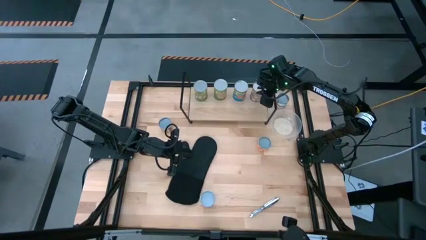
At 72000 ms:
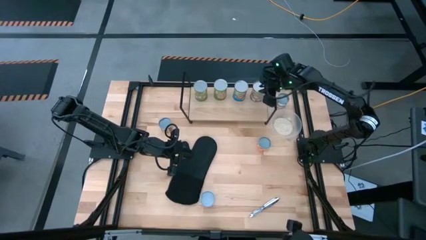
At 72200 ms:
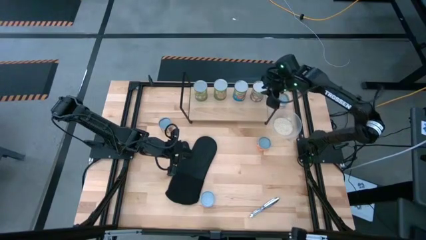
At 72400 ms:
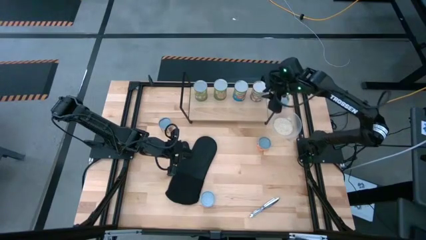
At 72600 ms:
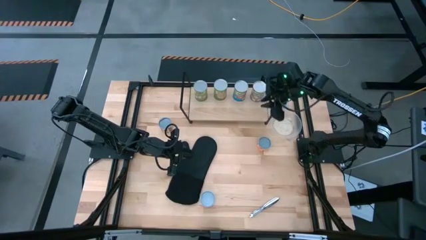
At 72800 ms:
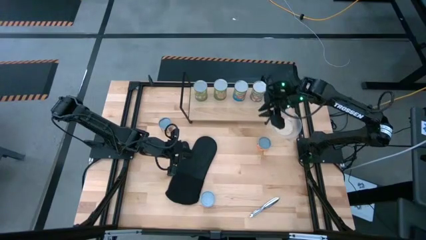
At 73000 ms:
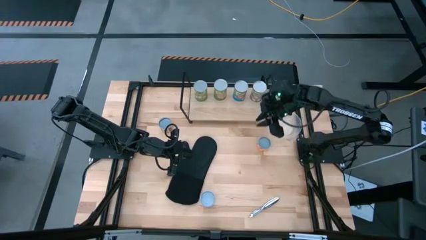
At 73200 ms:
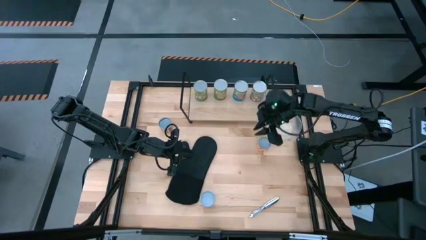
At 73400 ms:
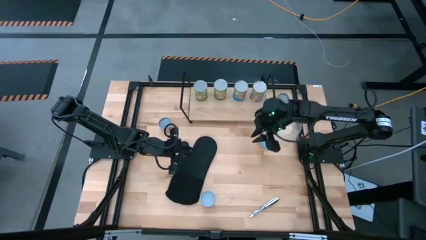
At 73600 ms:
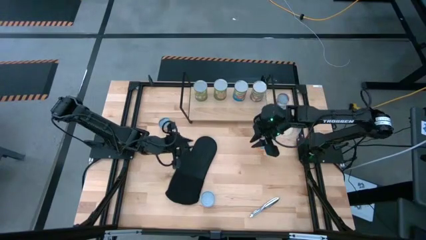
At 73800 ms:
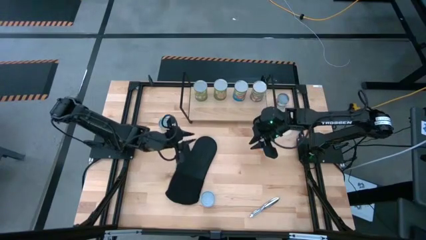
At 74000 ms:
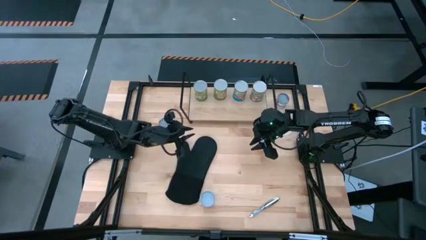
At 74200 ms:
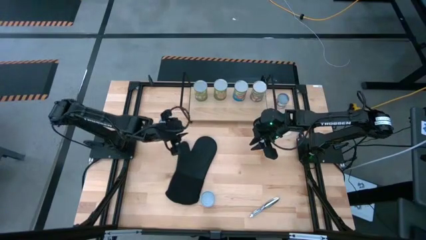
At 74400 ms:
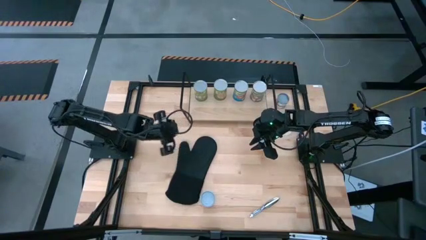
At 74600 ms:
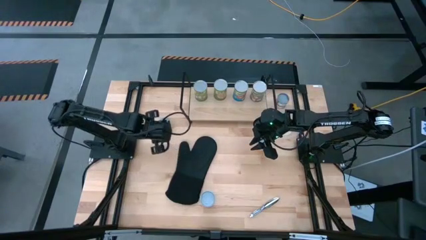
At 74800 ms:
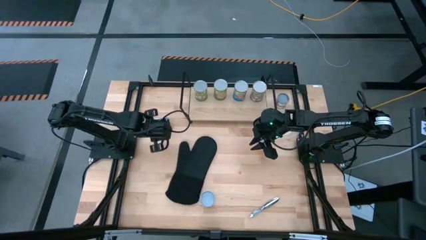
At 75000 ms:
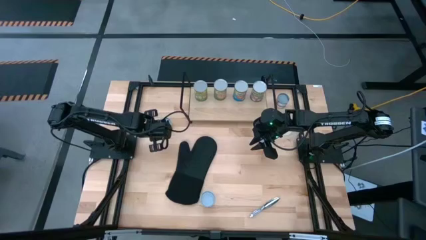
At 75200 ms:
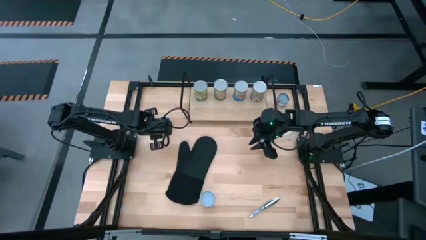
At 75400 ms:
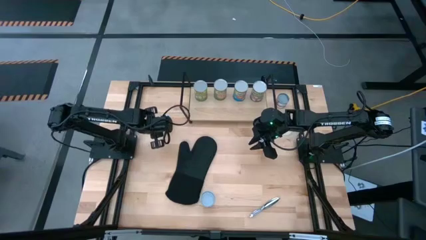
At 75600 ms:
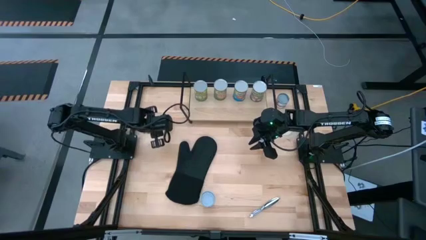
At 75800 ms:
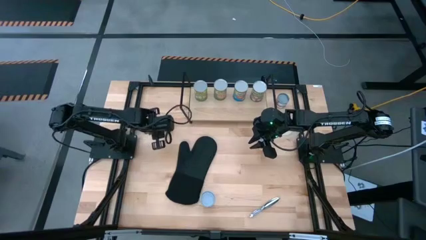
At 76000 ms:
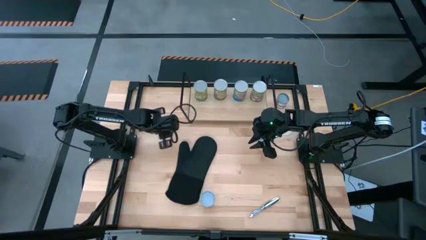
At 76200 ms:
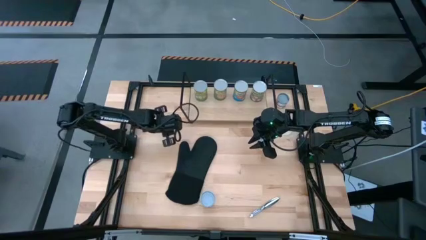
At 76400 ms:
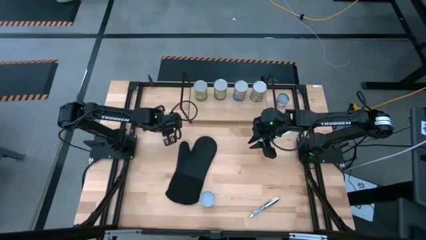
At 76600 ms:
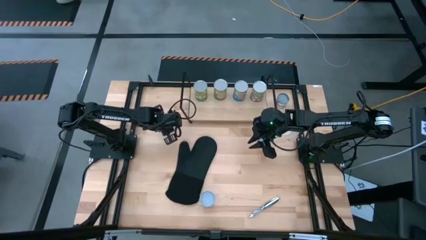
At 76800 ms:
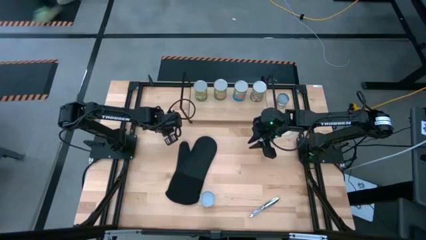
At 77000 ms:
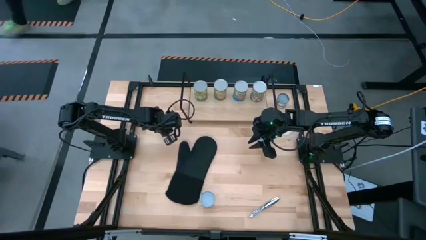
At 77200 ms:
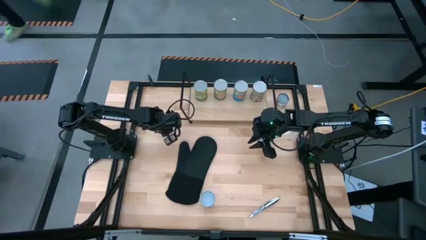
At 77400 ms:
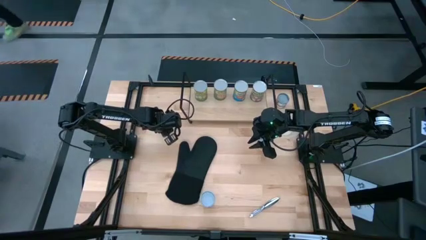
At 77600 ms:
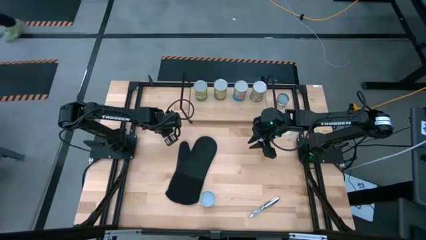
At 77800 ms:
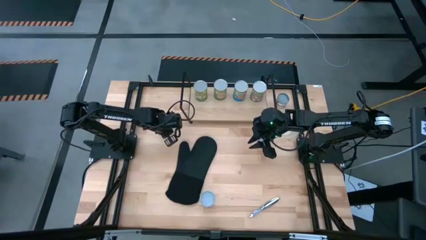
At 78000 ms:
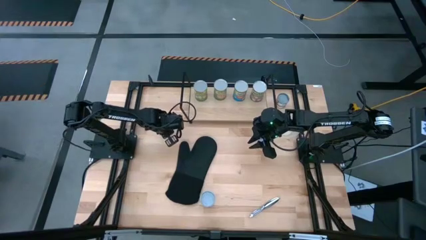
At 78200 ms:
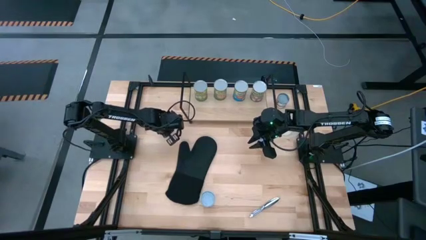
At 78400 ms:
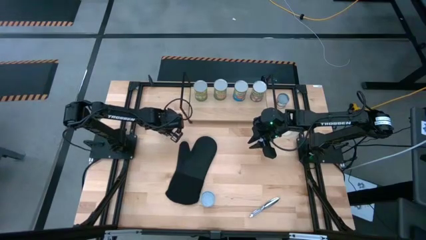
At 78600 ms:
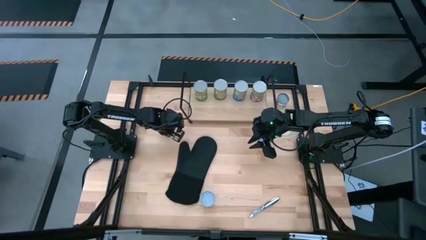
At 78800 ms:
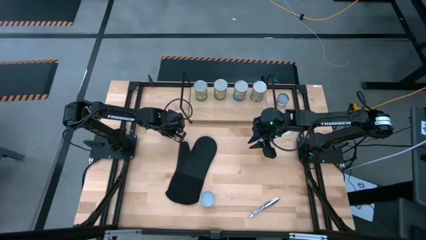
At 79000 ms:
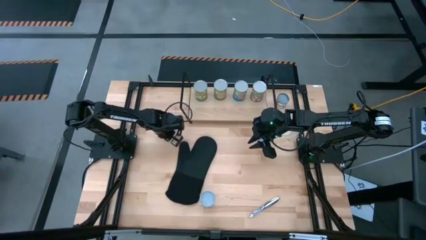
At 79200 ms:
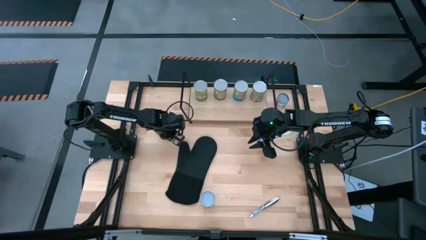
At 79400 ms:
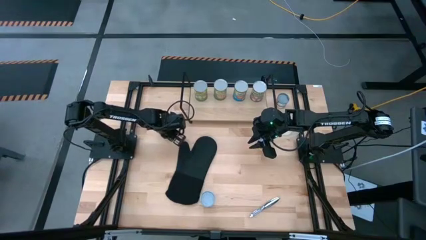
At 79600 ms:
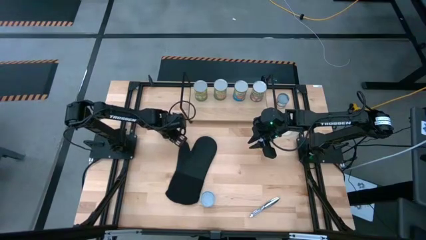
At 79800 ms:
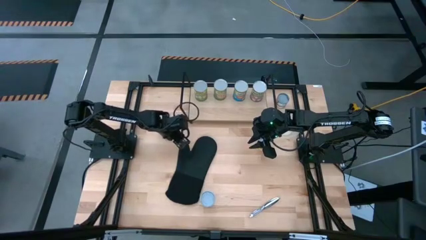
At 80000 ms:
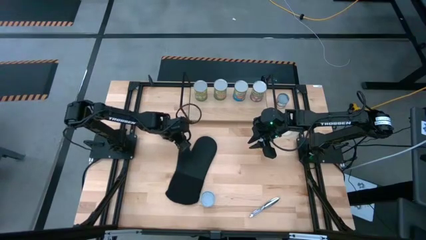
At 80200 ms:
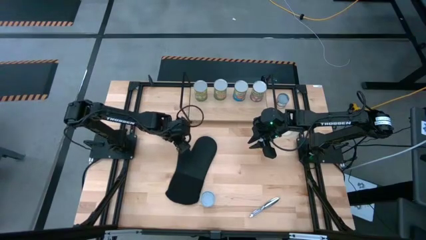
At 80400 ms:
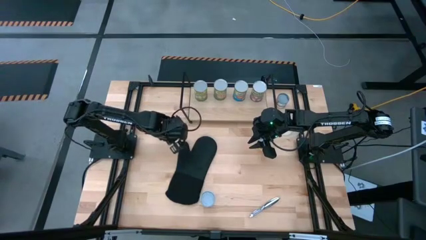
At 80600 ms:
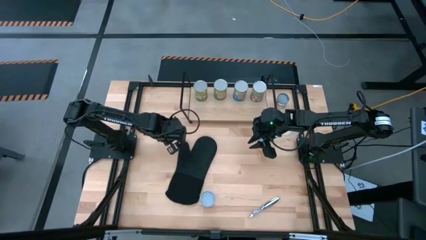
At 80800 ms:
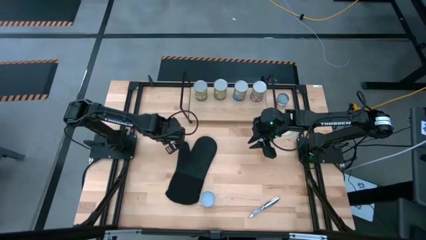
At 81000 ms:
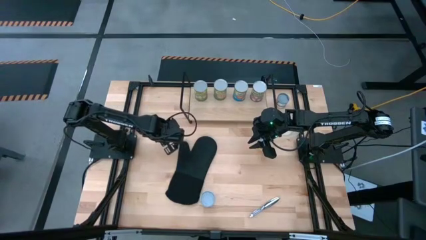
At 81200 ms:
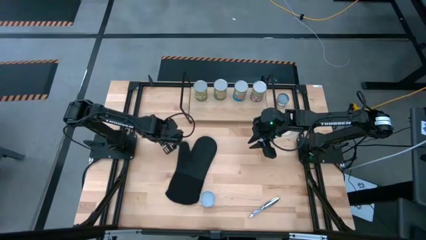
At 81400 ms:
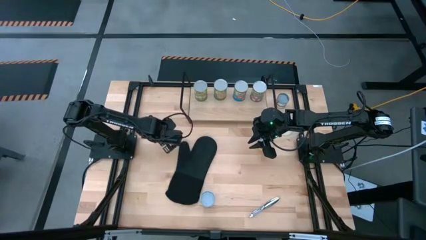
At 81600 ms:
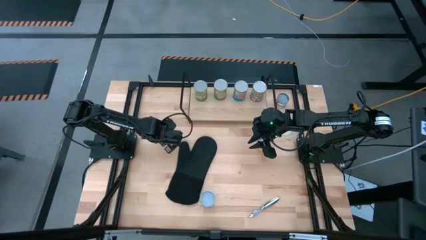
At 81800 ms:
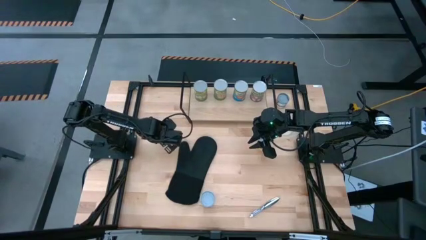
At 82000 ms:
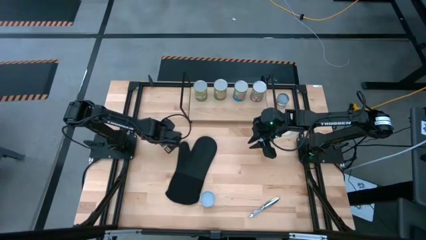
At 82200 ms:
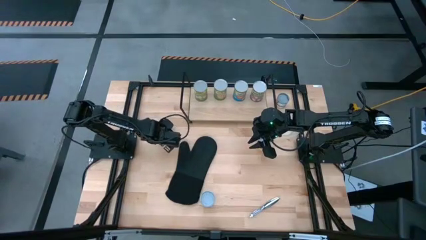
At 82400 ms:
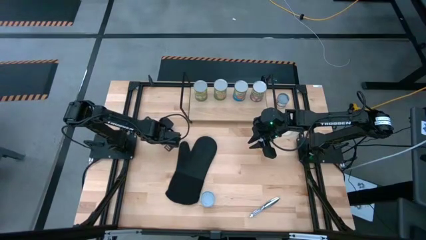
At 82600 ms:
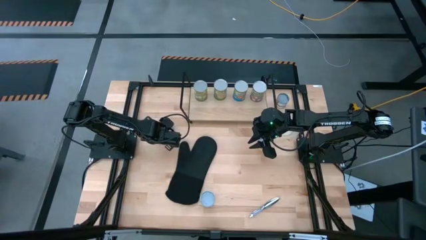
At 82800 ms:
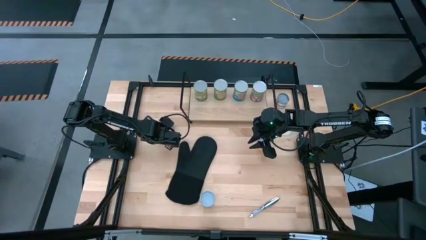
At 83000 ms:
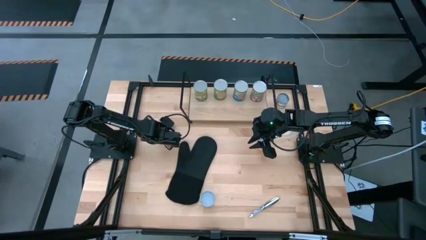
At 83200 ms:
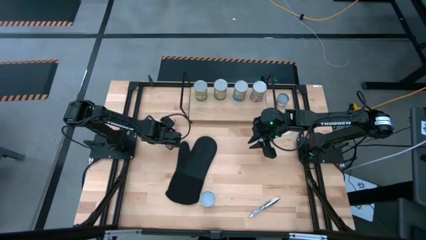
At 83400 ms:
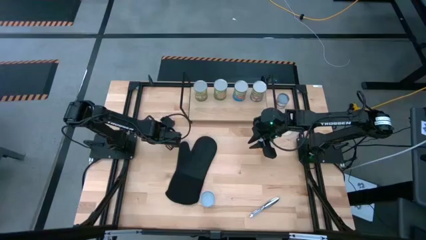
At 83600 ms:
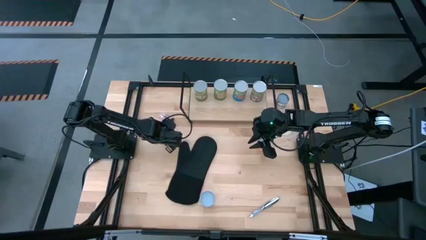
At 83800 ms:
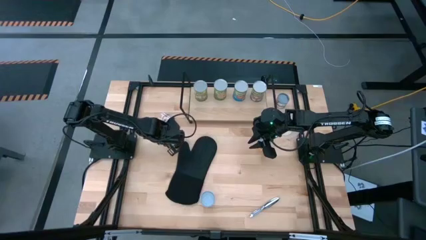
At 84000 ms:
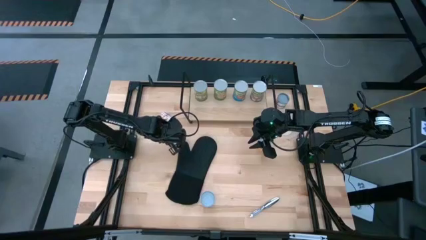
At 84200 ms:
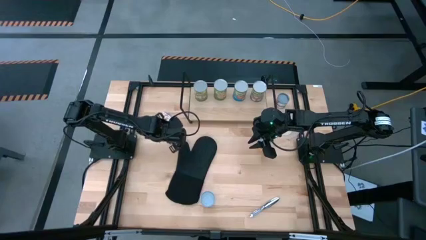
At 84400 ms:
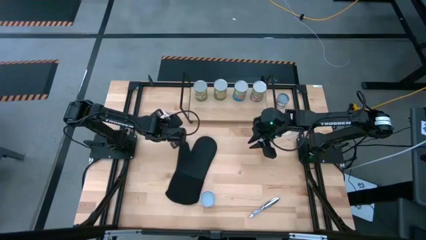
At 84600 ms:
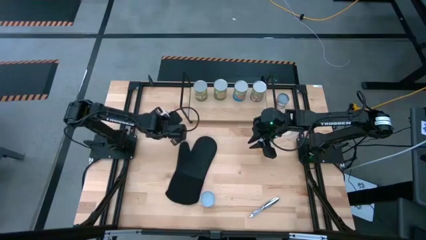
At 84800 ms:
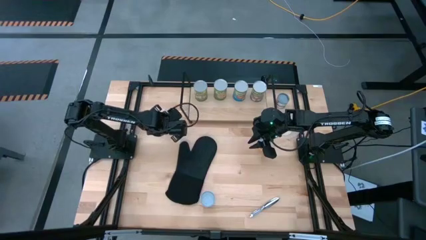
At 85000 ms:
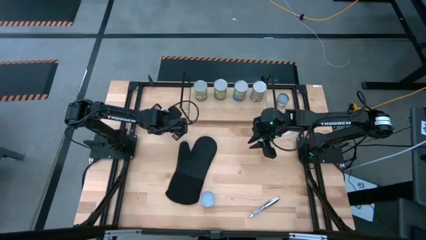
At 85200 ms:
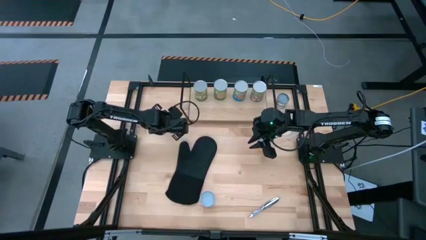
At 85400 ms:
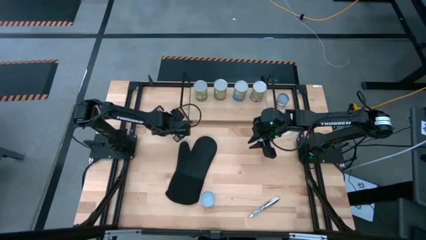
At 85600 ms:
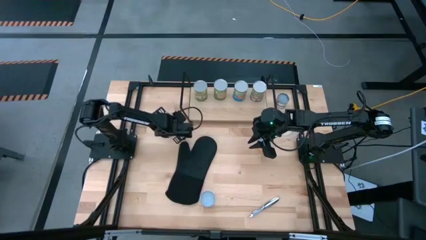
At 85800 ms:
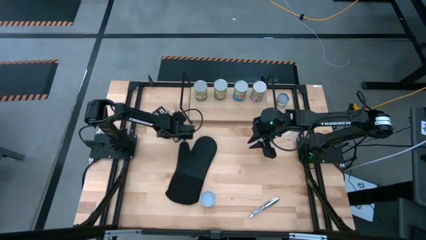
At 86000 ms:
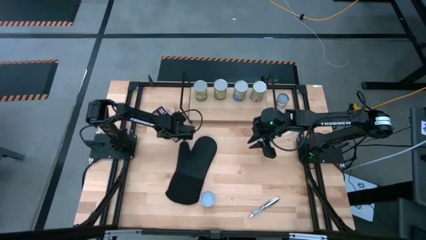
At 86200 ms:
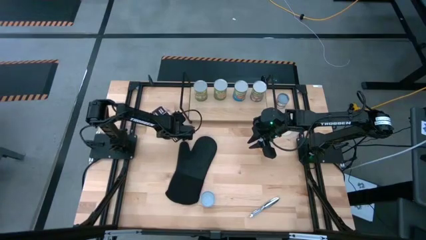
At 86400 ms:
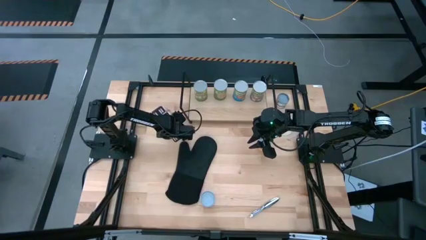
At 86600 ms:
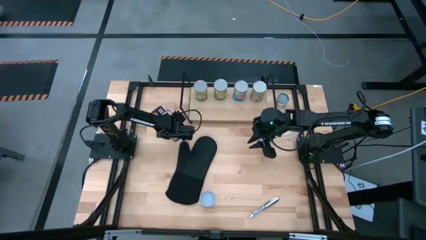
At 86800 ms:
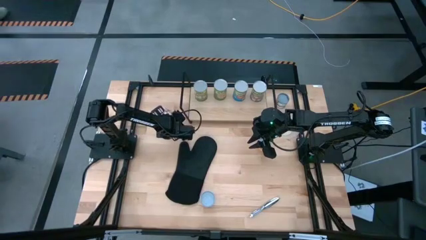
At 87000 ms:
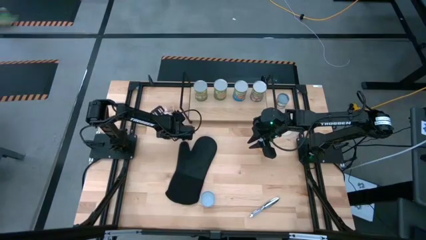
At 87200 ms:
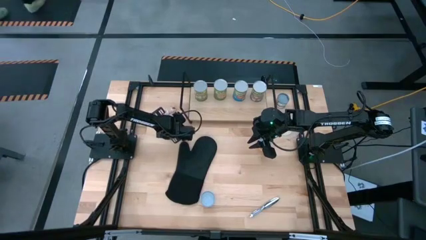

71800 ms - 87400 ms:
Task: Pick and place cans onto a shelf
Put the small canned tomatoes on the shelf
